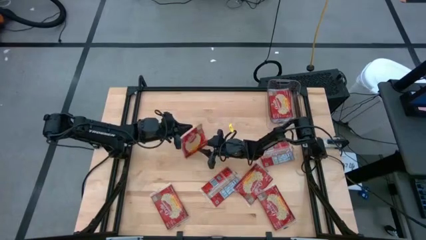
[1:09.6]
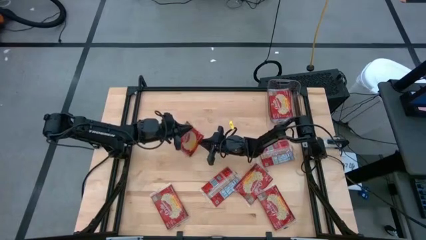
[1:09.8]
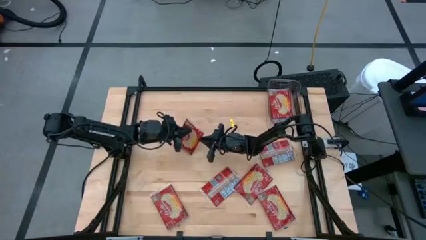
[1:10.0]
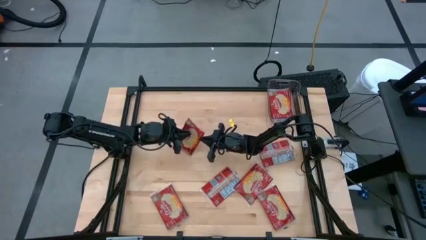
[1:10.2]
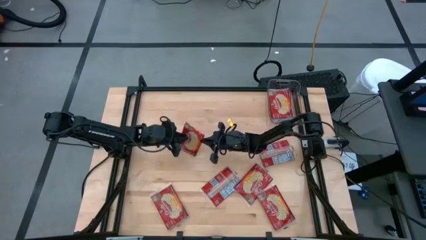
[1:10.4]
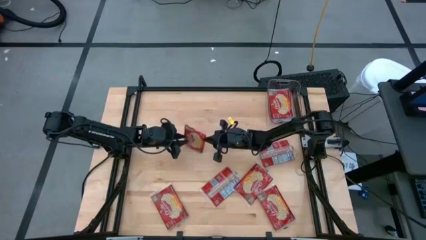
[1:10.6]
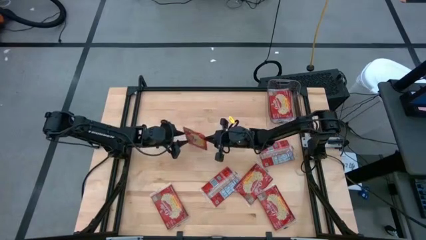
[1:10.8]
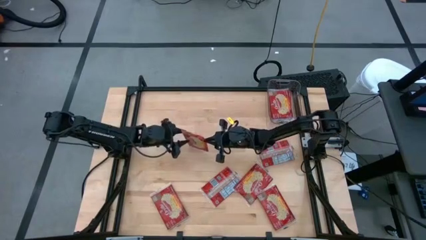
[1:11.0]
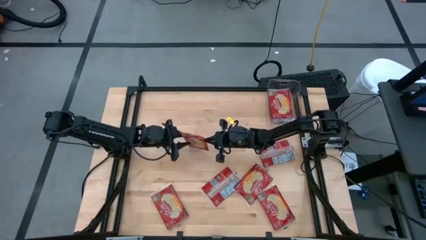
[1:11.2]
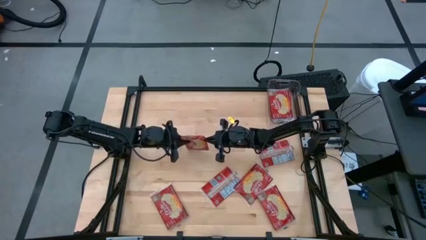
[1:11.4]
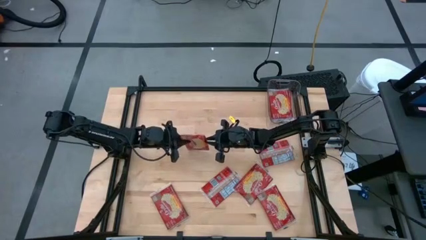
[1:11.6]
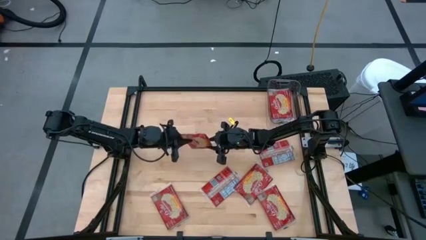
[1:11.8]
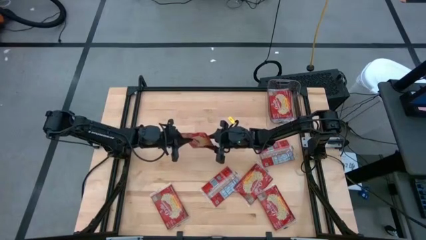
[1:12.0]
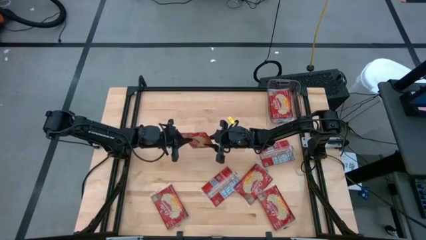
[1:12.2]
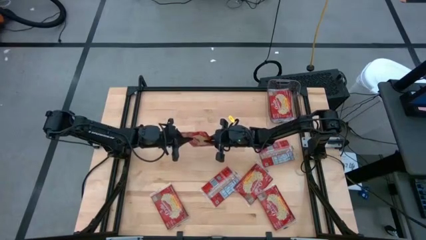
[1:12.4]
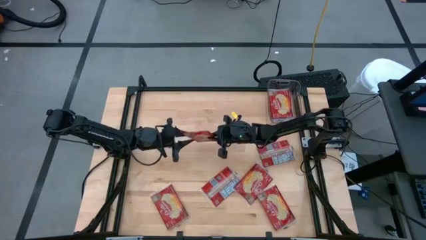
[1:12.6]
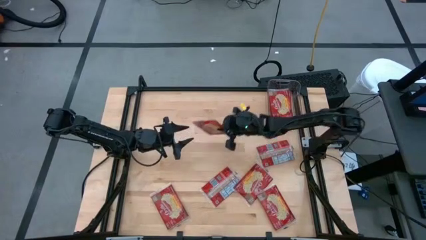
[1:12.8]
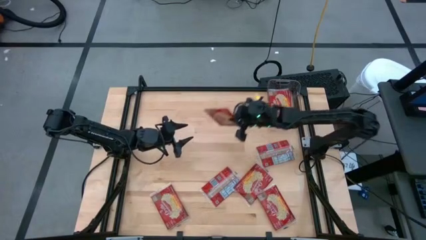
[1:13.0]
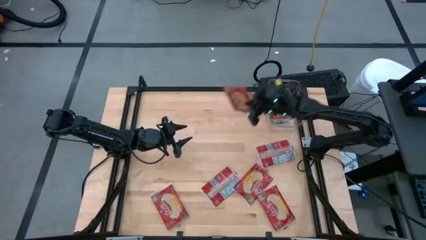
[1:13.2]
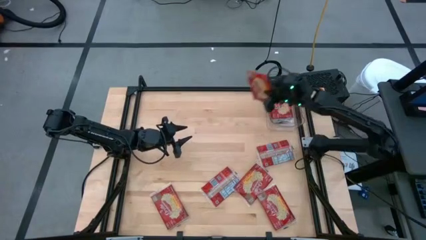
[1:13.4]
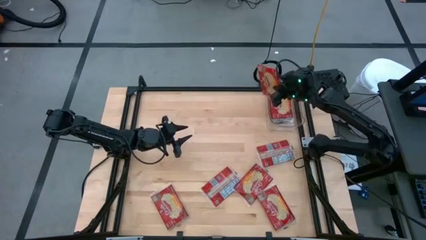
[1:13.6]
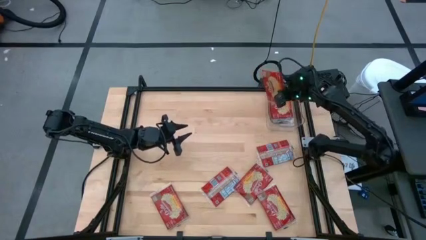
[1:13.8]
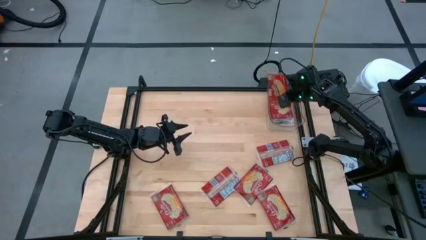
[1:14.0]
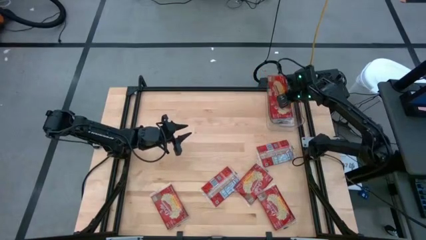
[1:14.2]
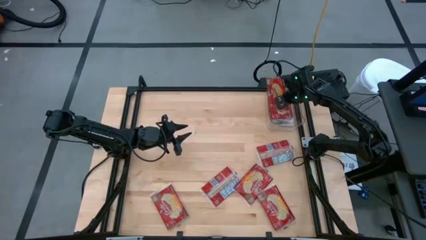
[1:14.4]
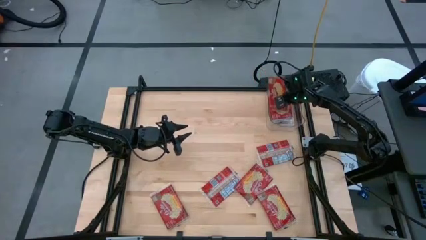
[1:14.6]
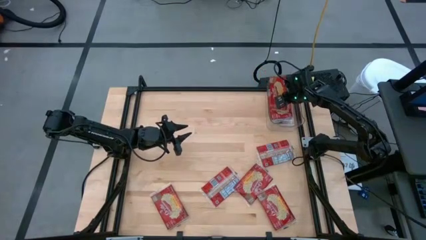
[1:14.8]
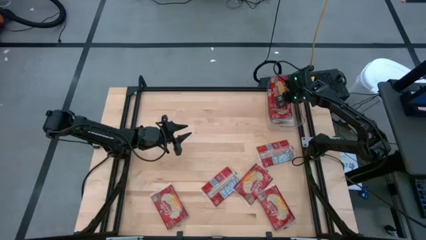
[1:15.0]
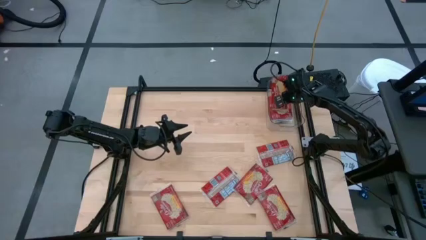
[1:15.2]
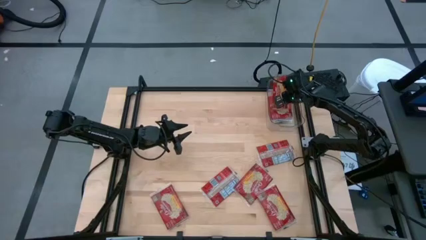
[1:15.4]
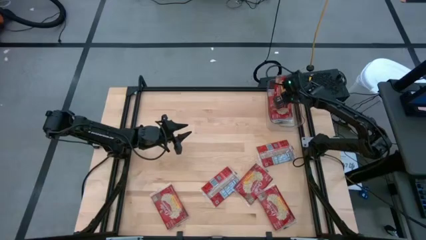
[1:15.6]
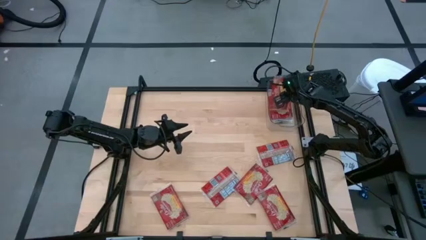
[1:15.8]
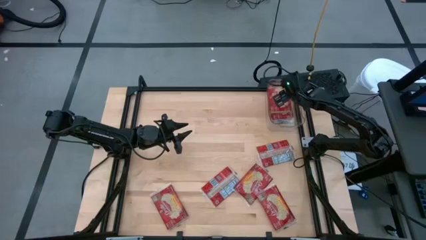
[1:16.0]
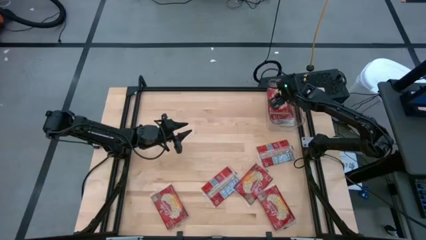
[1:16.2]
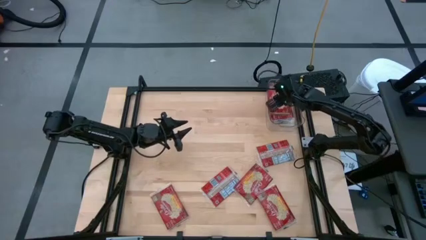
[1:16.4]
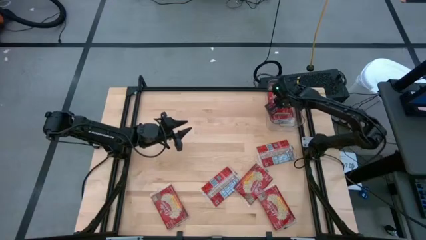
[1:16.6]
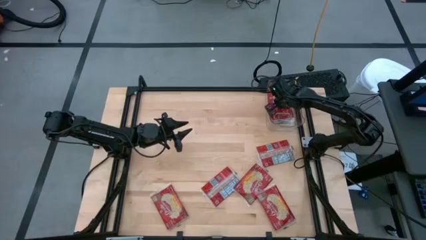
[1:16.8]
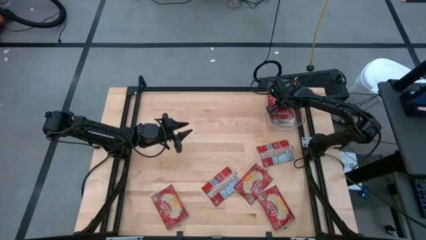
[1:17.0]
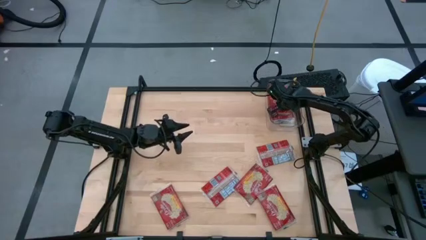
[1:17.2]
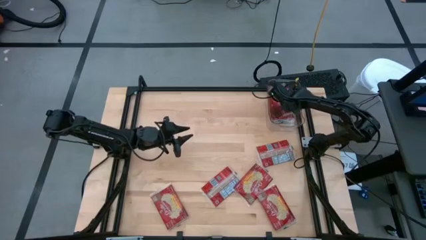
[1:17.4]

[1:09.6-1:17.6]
Task: Sort popcorn bags into baskets
Put the red popcorn bag into the transparent bin

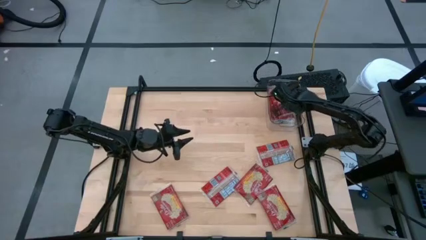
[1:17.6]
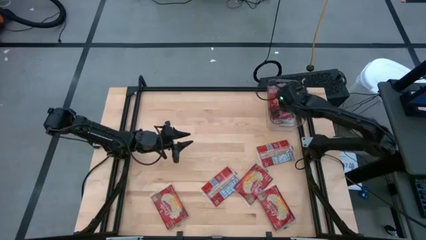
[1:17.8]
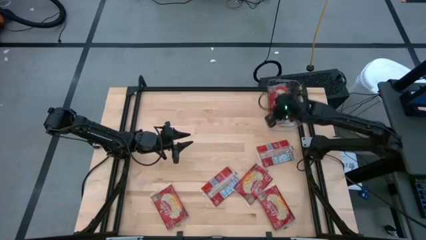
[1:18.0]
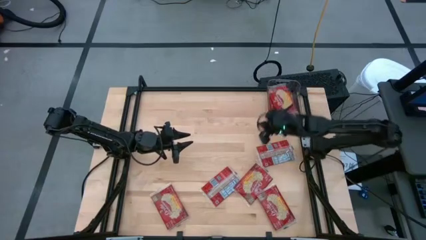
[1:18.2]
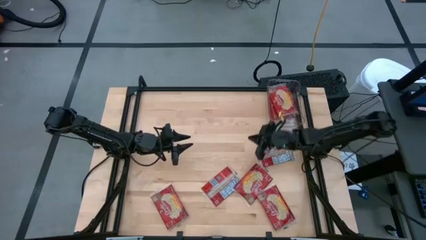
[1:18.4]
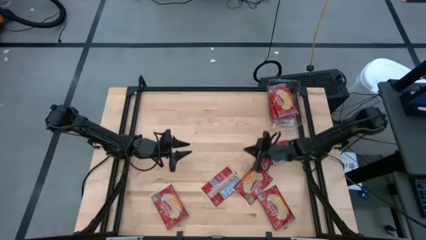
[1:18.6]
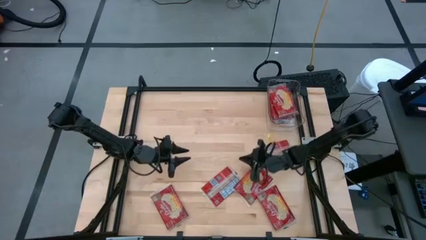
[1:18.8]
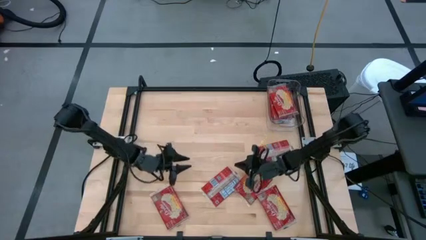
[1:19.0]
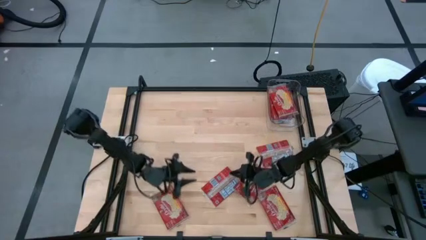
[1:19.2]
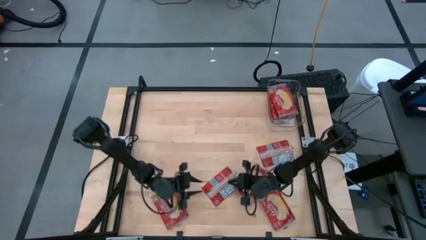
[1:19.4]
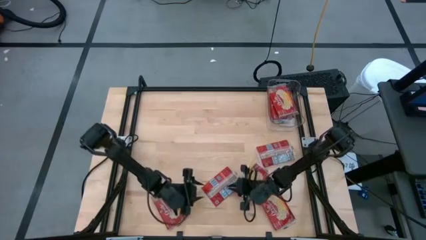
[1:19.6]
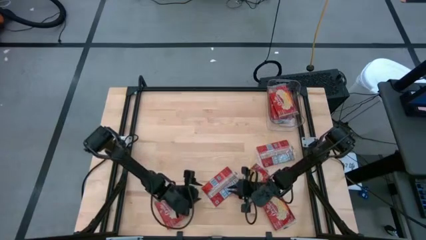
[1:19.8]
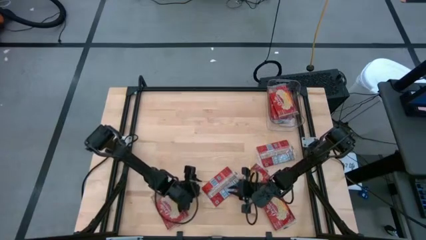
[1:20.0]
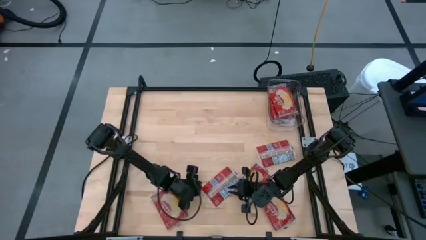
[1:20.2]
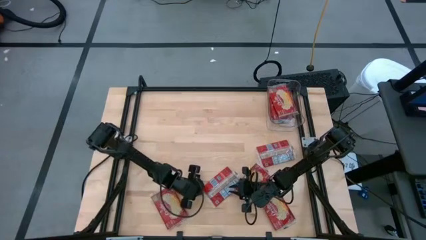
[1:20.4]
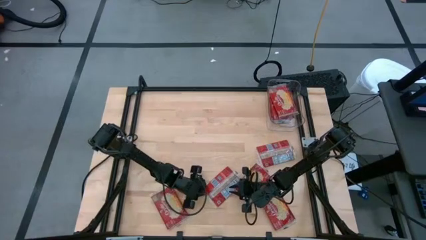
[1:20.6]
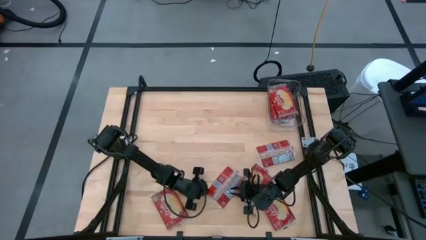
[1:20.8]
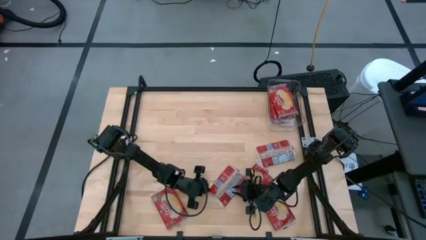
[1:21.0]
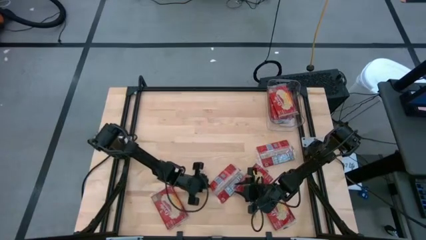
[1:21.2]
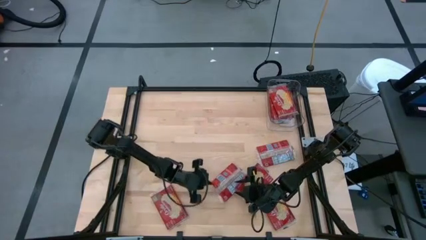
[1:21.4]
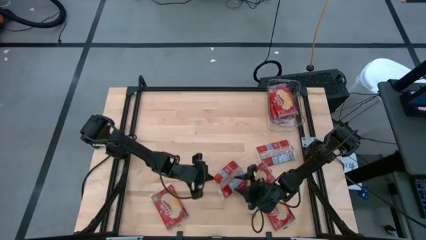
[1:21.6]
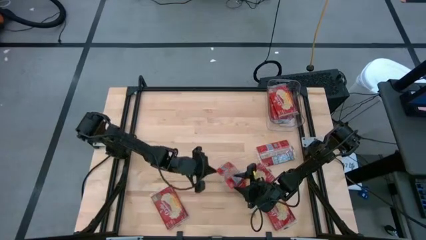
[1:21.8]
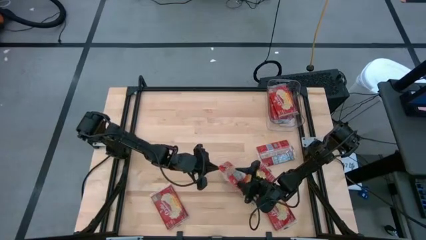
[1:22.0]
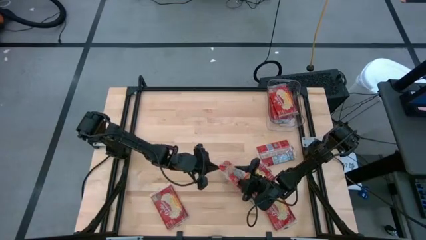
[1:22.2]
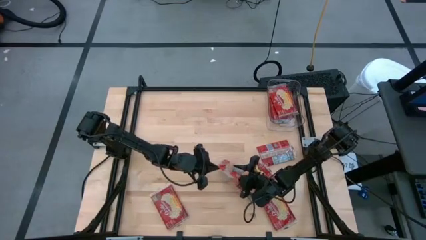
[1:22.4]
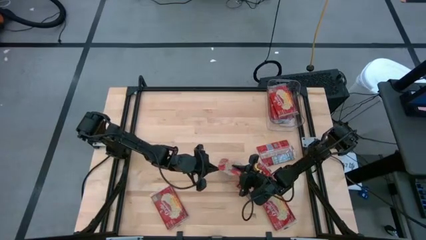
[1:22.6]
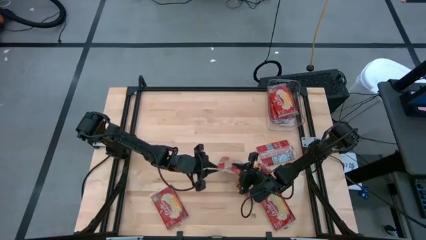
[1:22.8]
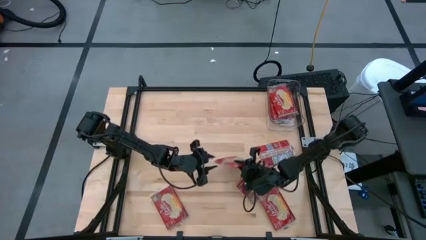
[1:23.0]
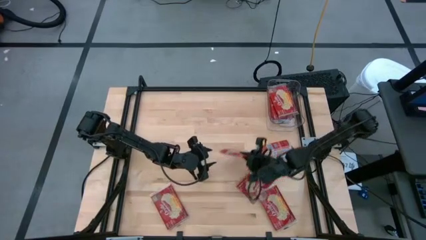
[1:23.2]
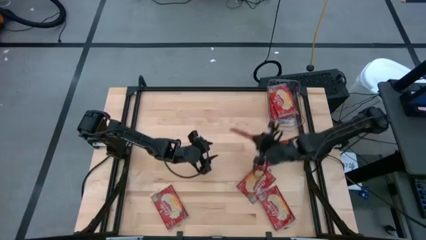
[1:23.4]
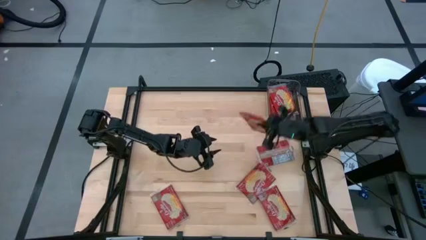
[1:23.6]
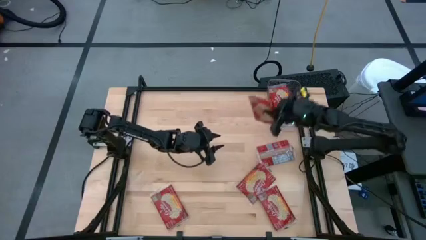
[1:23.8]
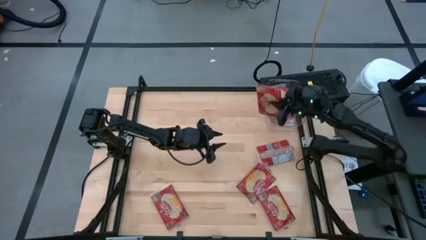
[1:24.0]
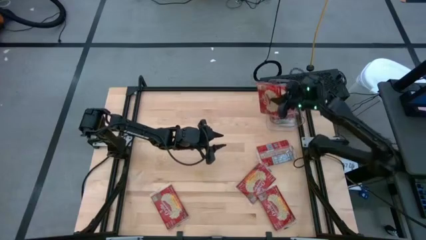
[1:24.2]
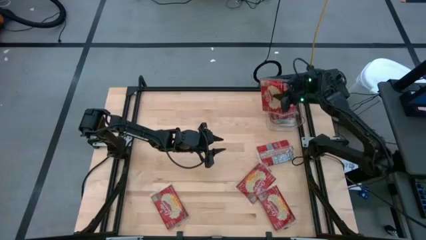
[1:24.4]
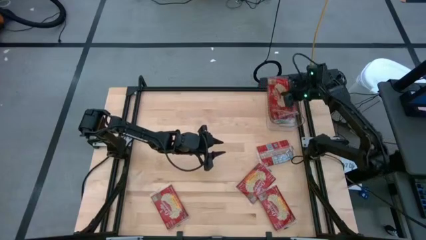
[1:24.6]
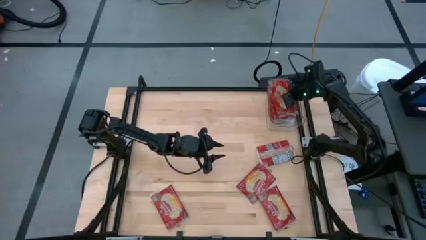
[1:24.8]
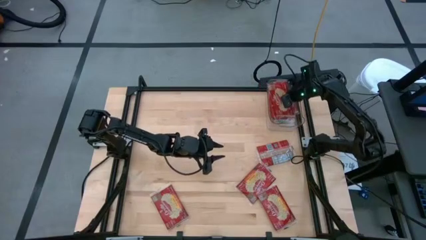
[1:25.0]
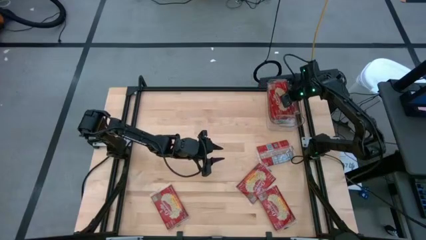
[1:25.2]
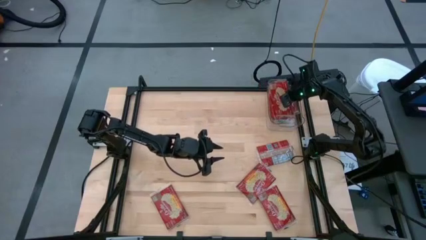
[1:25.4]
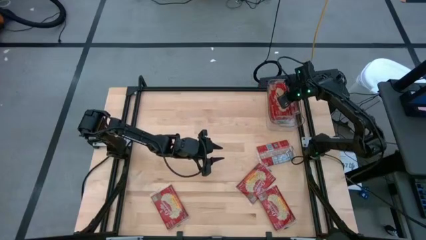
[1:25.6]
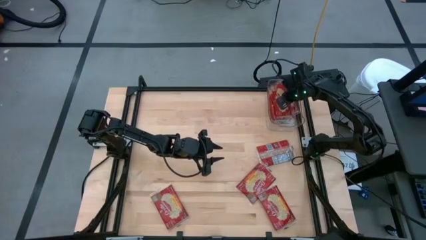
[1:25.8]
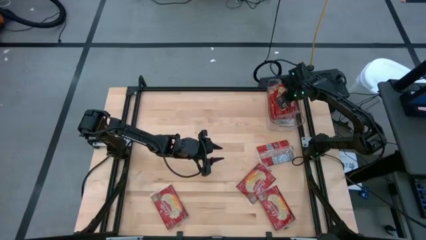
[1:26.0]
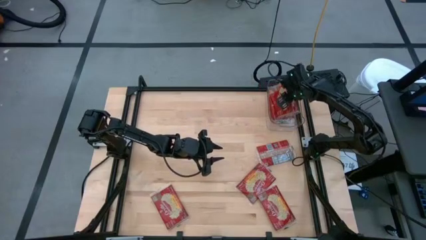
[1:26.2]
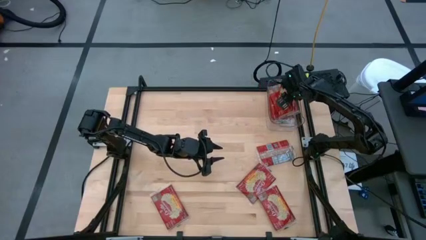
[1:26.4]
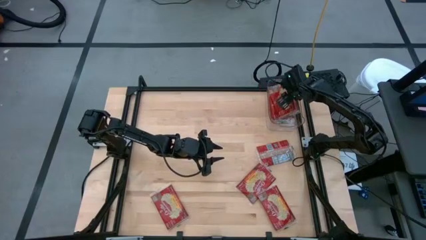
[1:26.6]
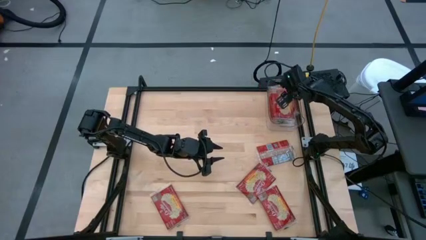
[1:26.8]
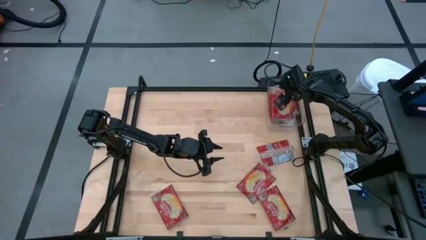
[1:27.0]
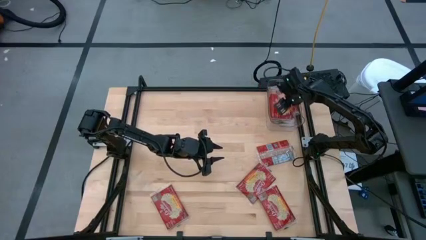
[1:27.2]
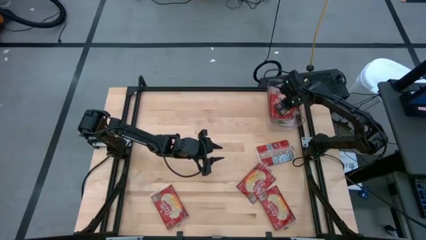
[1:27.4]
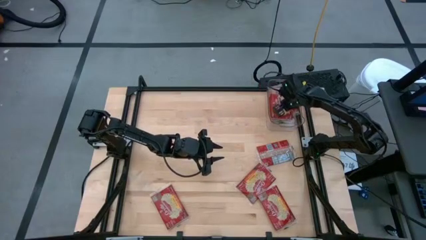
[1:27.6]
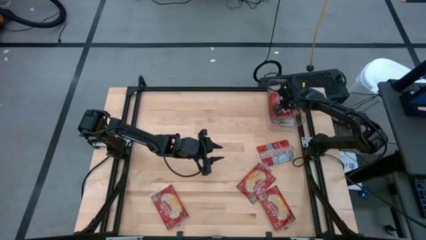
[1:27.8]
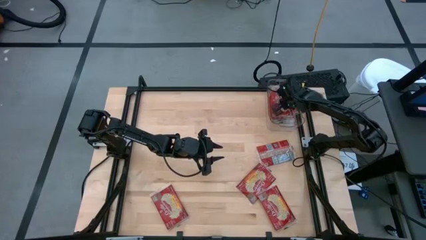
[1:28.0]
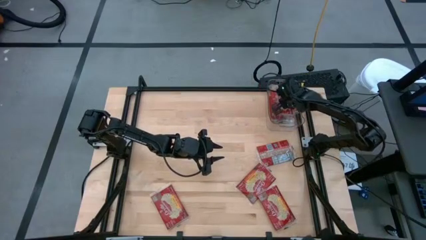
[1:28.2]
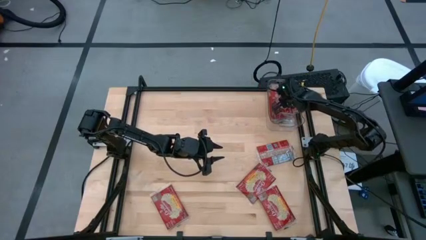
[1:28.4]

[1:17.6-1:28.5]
Put the red popcorn bag into the transparent bin
